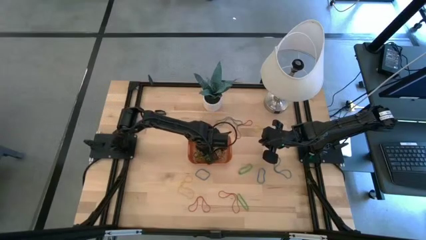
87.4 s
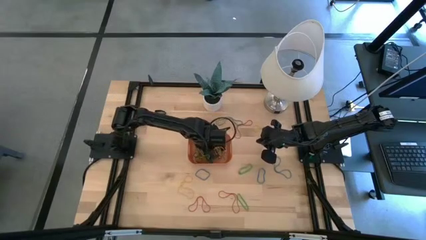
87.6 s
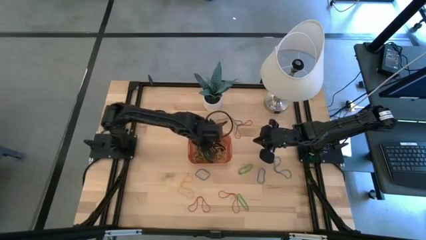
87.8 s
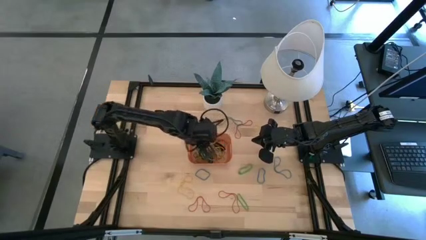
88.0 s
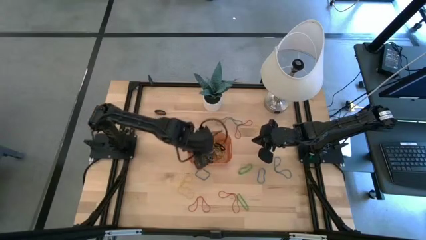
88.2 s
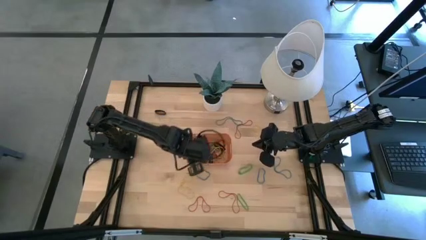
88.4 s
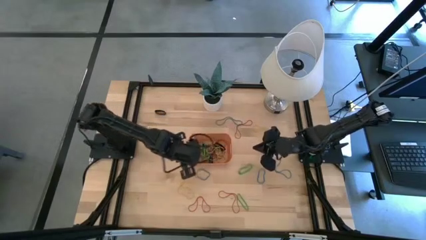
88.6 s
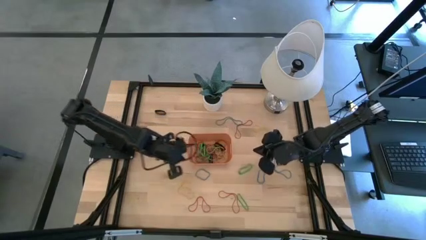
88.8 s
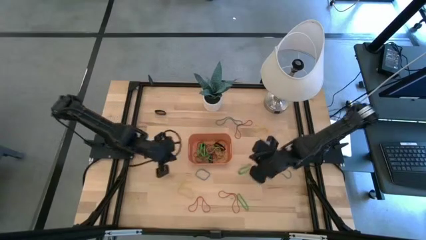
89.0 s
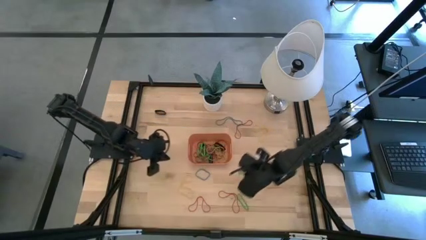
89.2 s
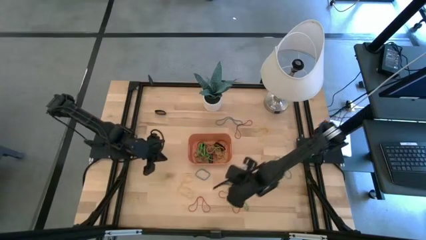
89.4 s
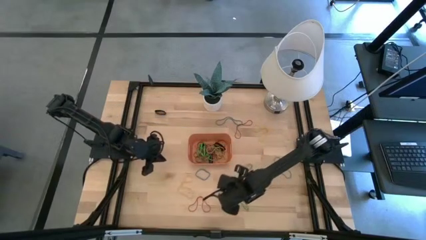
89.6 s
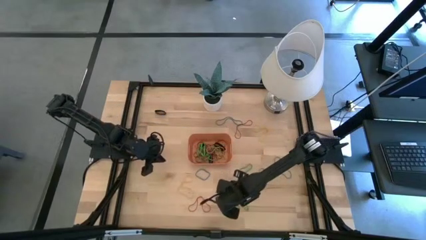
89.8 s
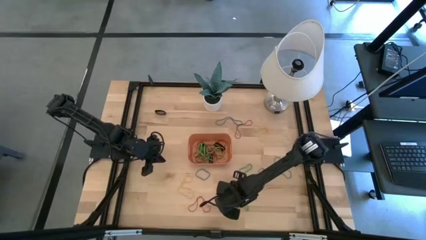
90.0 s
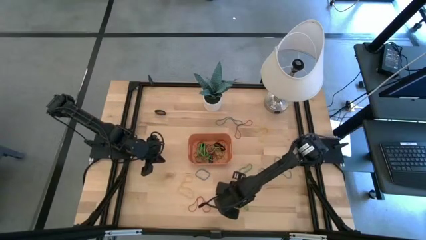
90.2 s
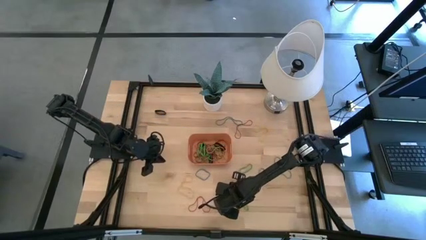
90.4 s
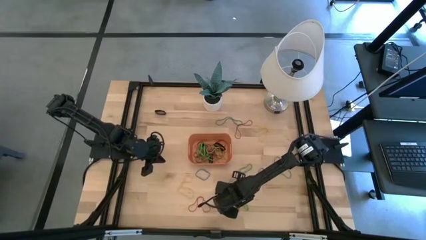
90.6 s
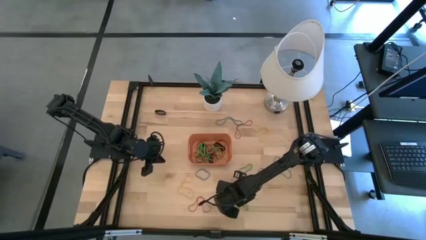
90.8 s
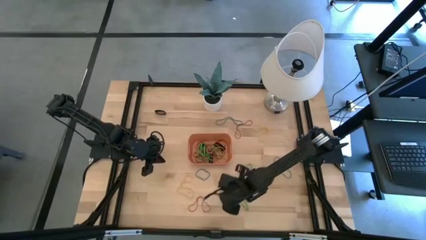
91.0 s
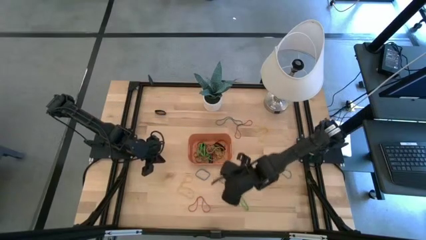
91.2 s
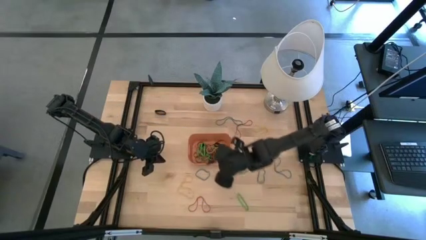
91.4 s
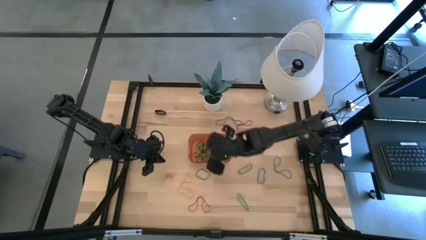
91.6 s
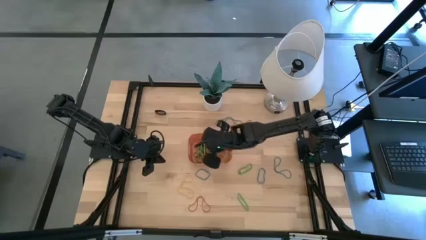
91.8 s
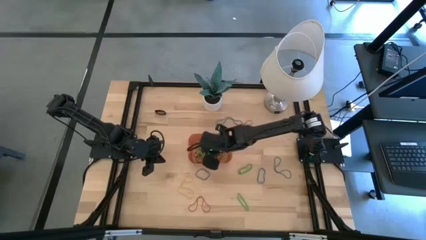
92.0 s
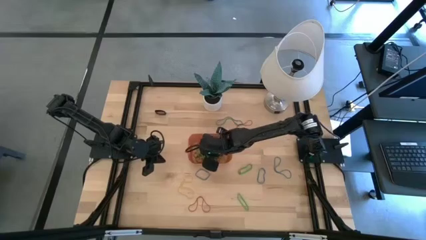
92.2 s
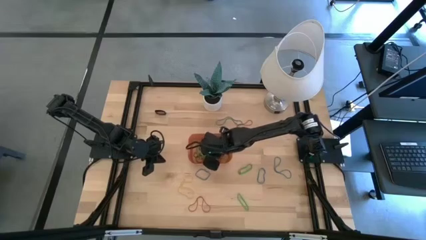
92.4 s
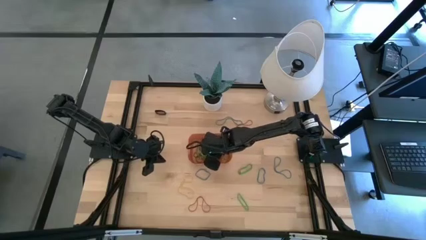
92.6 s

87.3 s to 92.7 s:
Task: Pick and place rubber bands into bin
Put the red rubber band into the orange bin

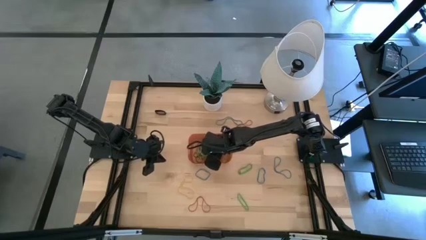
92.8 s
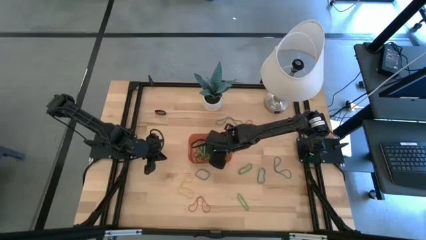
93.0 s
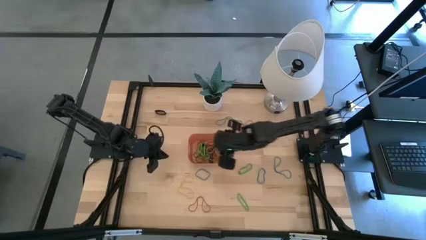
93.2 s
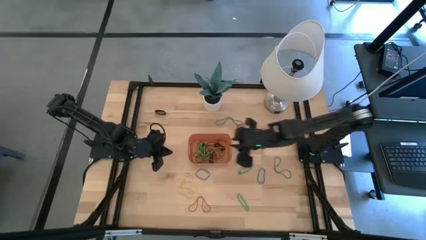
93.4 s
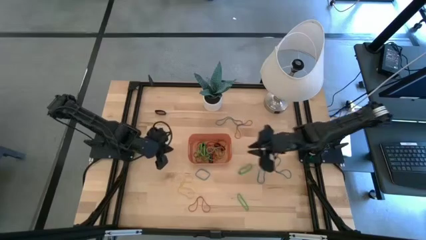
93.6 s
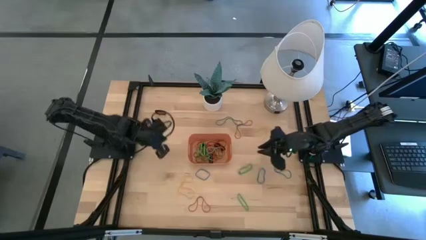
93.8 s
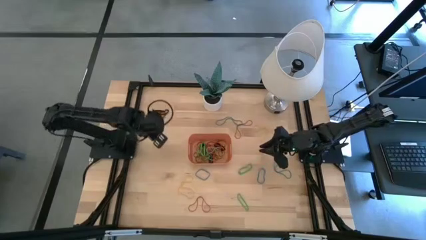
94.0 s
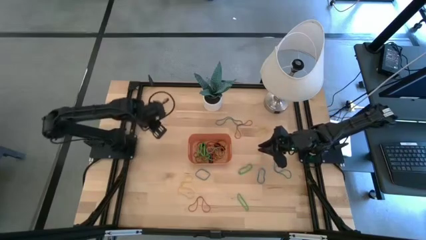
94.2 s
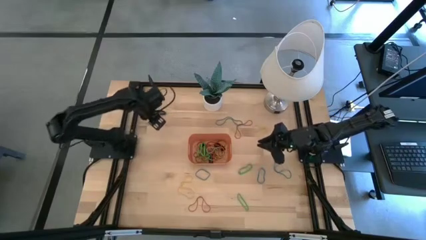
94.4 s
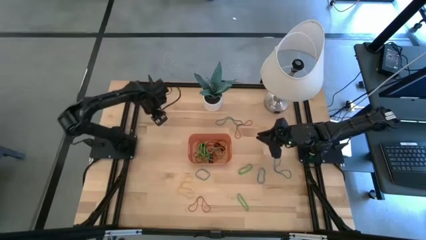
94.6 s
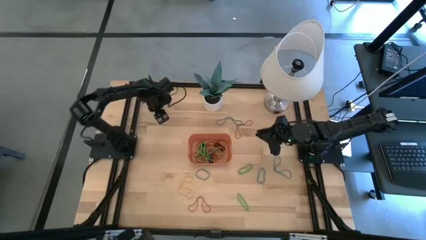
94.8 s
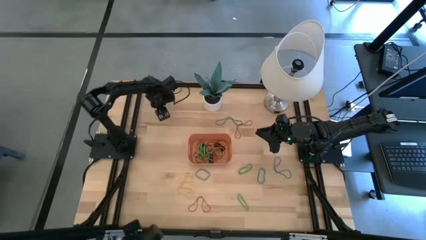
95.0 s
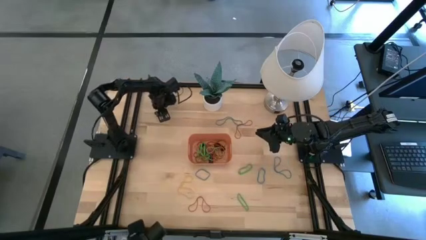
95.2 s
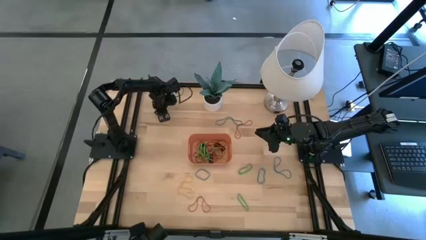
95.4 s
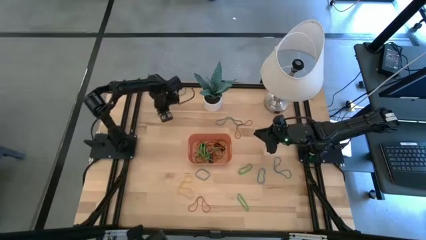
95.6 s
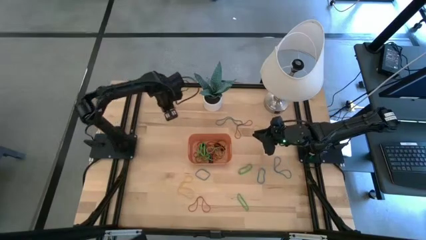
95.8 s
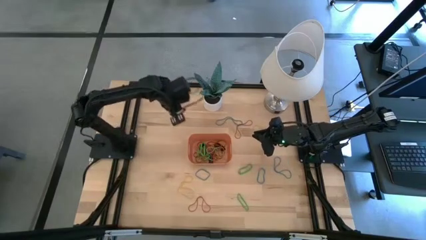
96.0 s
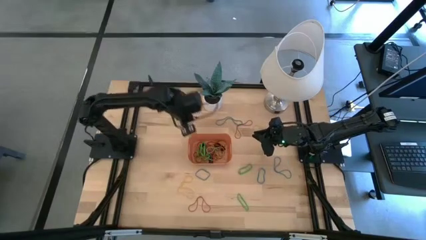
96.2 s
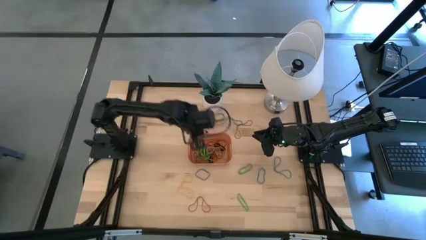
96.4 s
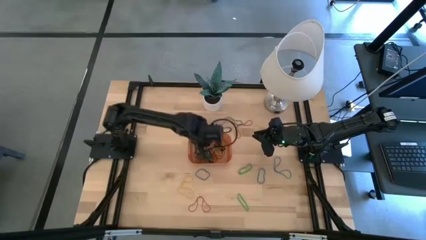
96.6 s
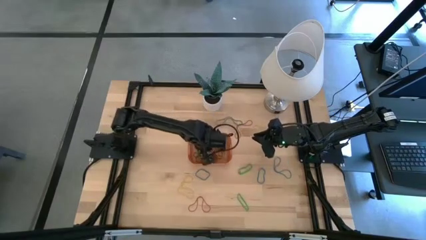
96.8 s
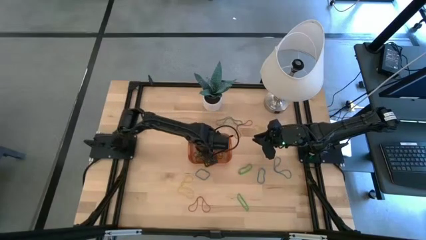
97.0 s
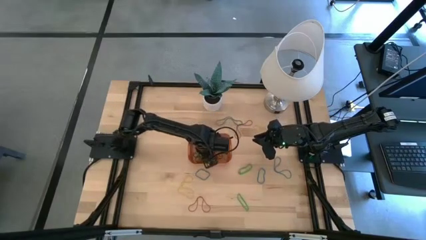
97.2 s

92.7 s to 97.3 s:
Put the black rubber band into the orange bin

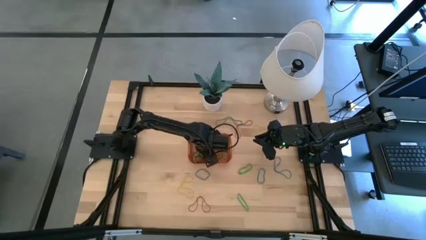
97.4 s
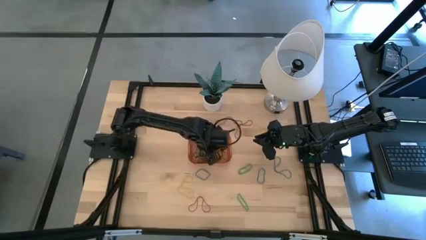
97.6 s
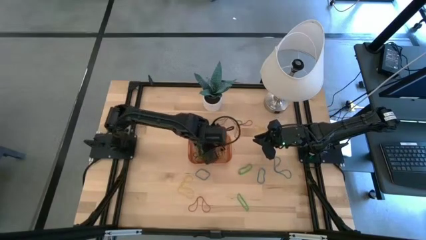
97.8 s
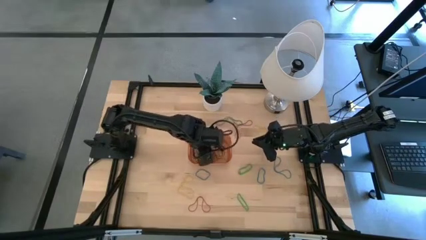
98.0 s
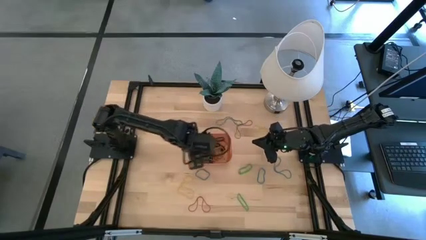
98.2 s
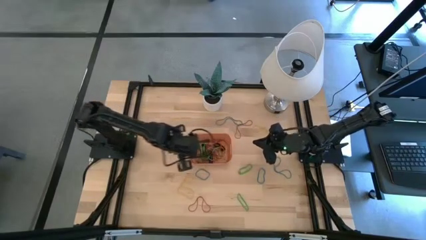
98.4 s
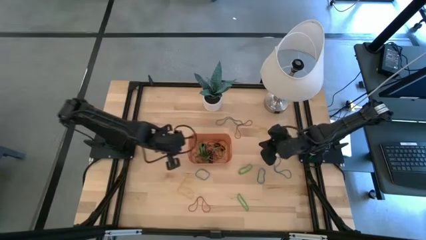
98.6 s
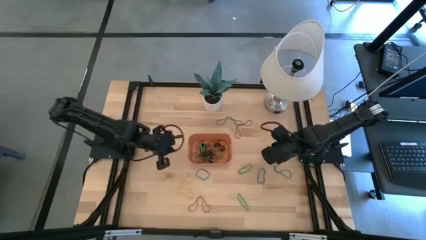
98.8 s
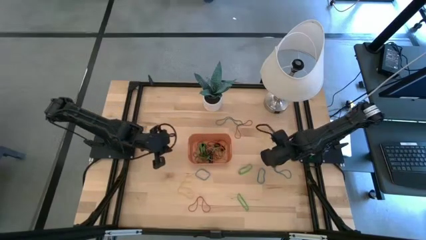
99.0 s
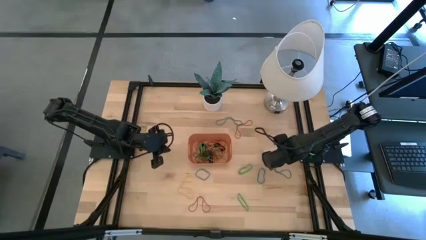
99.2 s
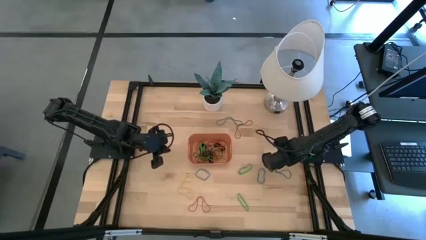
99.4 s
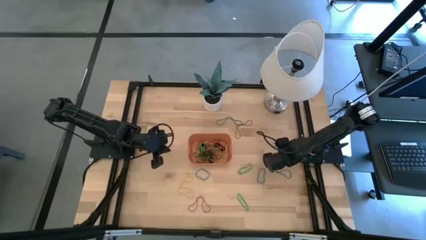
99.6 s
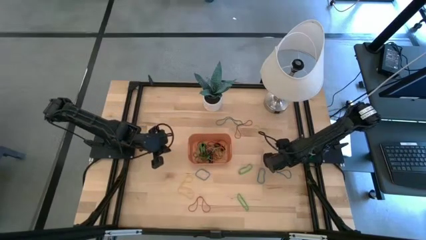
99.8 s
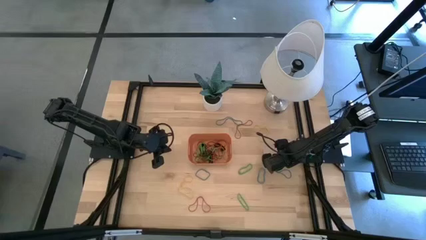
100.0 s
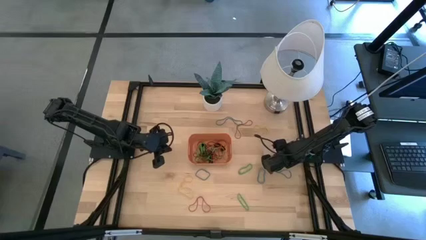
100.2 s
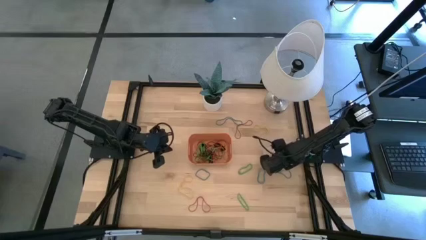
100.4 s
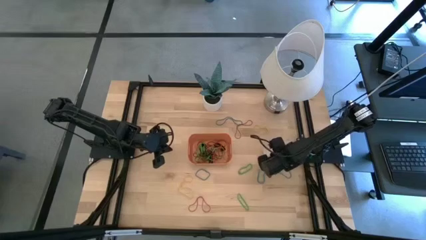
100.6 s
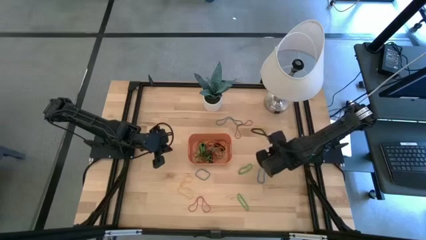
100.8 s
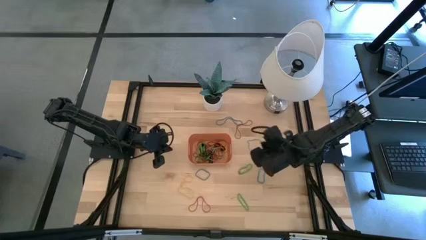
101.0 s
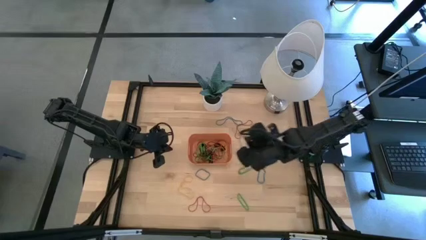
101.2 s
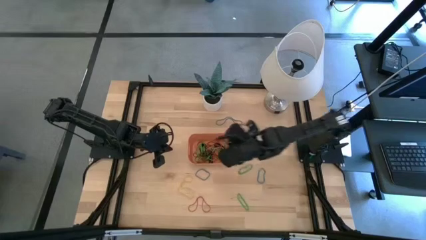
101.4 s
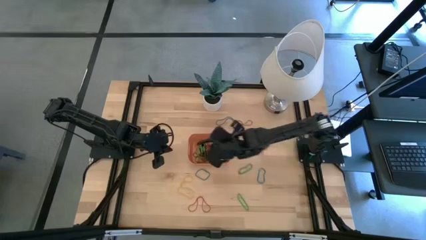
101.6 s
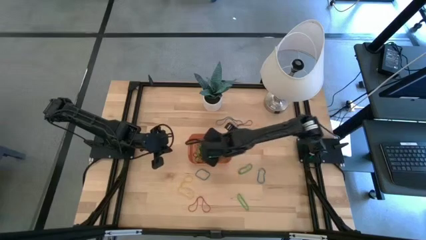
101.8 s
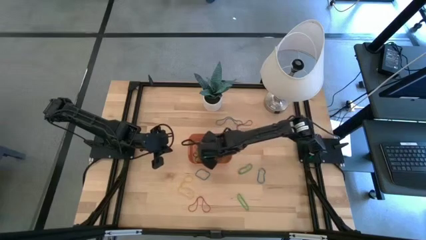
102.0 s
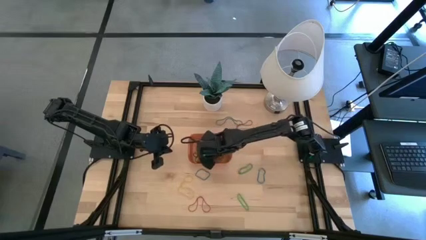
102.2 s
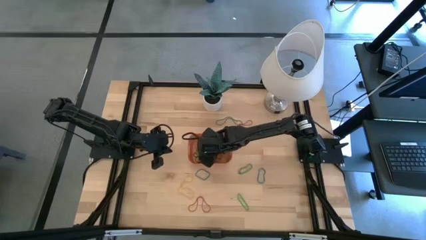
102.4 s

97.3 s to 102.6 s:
Put the blue rubber band into the orange bin

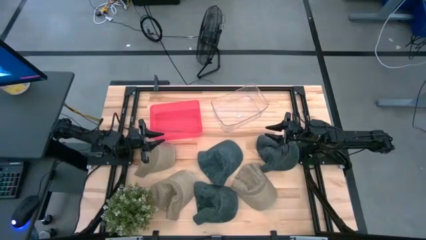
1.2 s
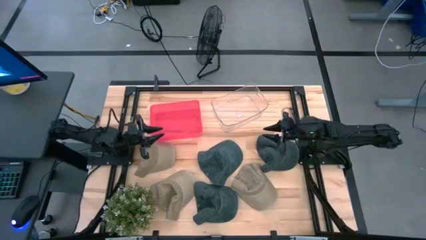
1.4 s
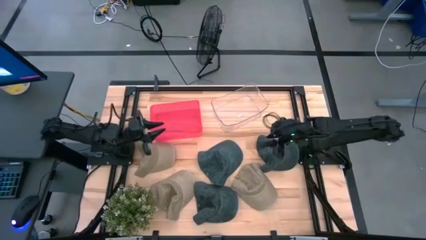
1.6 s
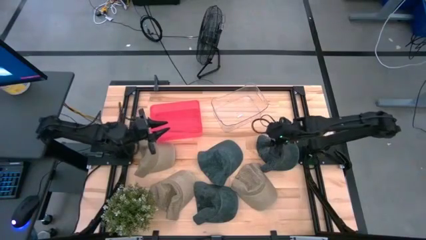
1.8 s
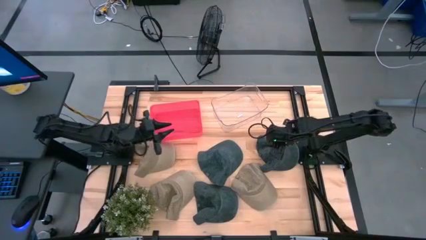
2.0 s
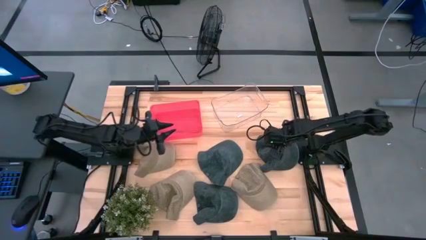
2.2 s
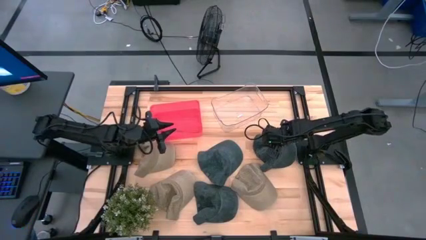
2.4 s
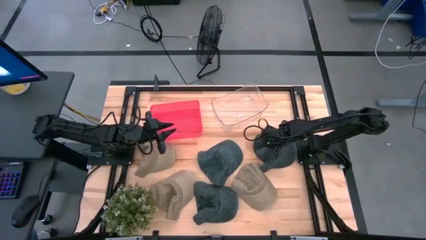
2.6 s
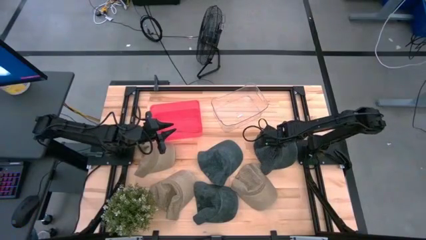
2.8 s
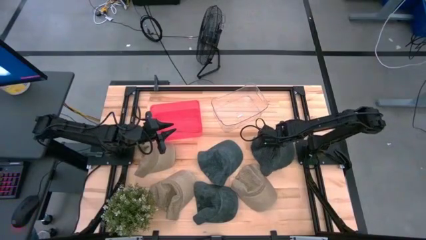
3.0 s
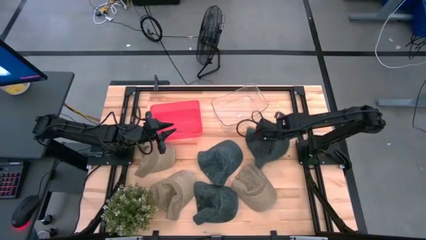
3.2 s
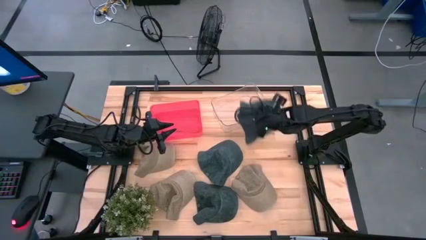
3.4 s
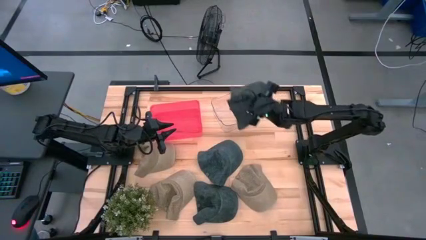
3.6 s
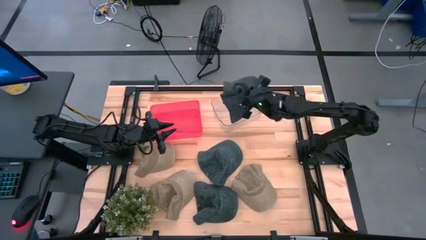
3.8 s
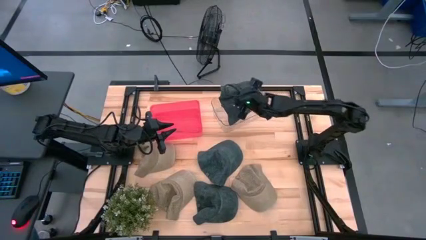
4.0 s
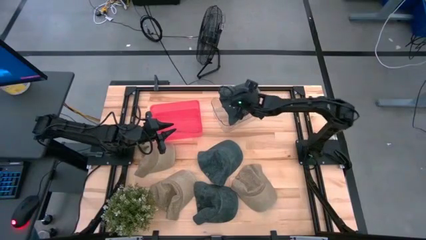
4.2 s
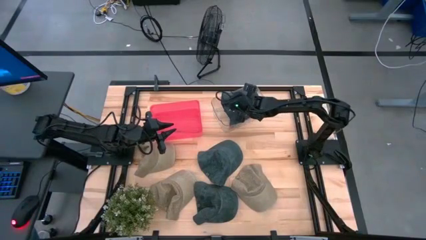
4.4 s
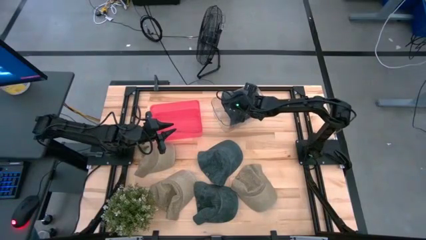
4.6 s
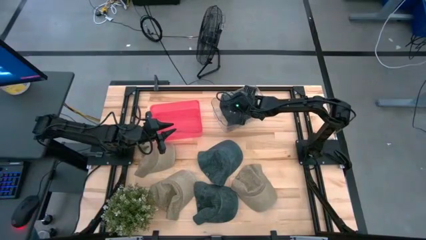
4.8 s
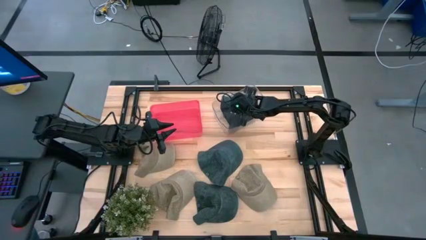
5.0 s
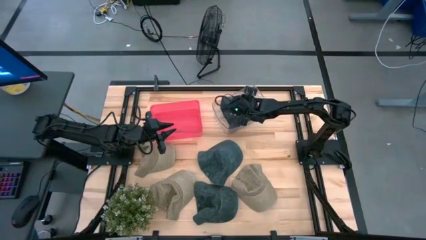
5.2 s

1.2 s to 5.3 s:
Task: Pick & Place hat
Put the top right blue cap into the transparent bin
